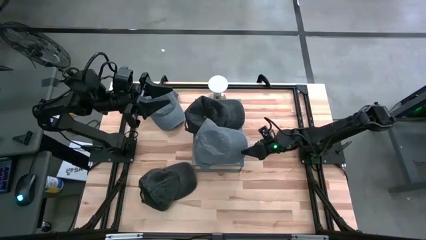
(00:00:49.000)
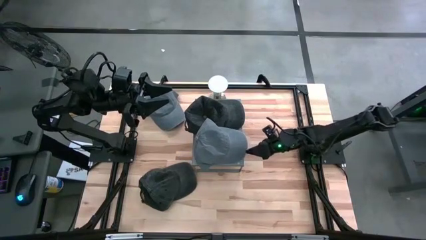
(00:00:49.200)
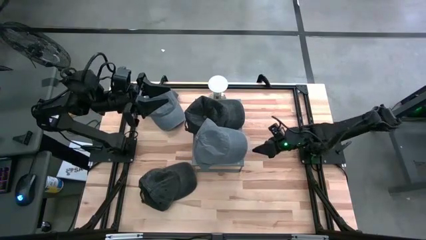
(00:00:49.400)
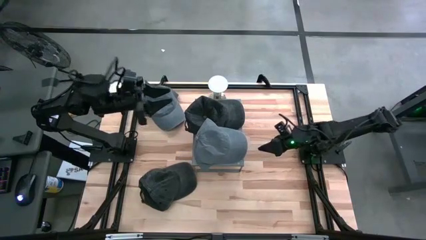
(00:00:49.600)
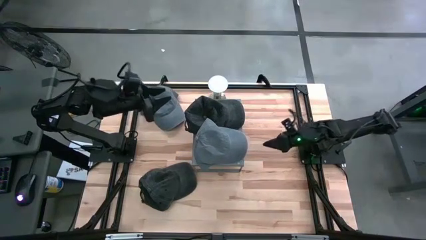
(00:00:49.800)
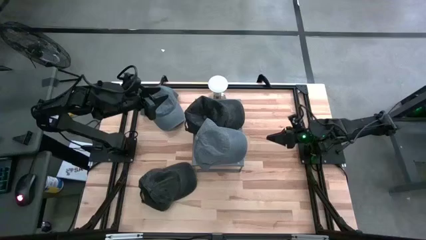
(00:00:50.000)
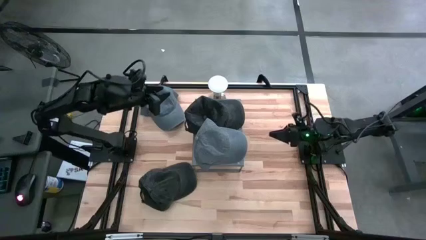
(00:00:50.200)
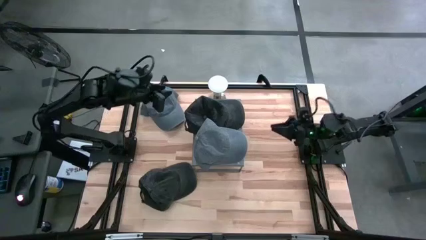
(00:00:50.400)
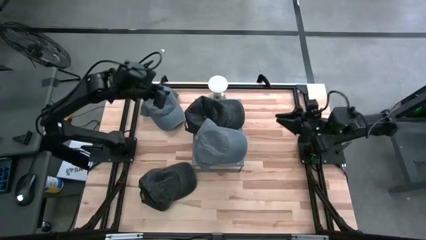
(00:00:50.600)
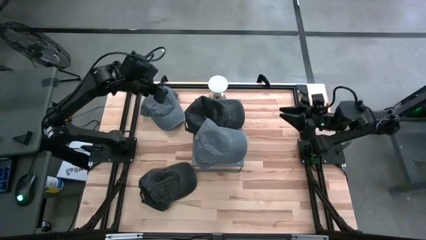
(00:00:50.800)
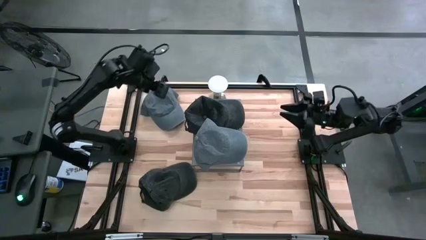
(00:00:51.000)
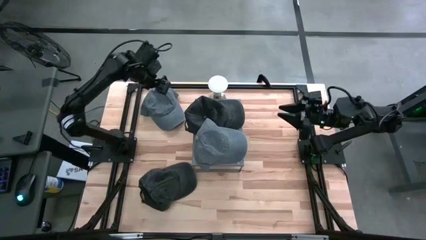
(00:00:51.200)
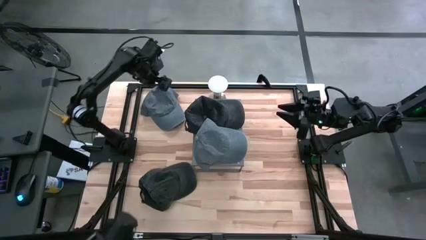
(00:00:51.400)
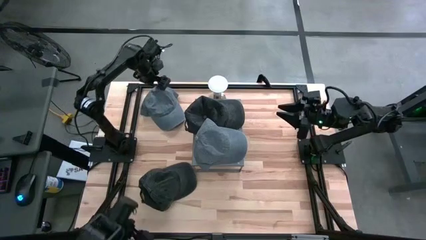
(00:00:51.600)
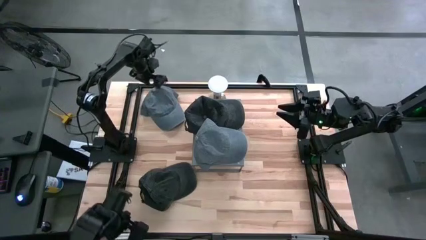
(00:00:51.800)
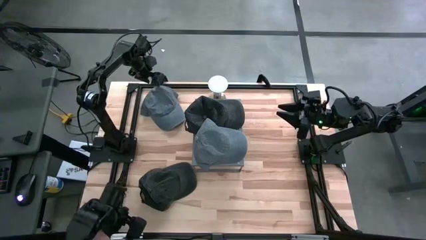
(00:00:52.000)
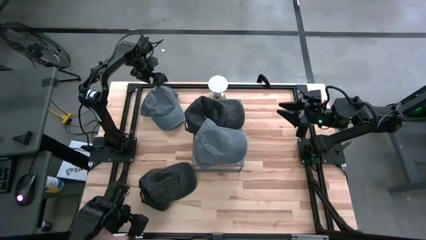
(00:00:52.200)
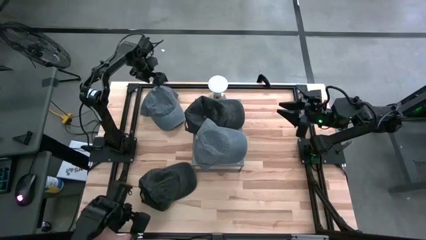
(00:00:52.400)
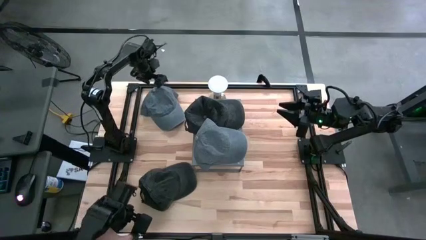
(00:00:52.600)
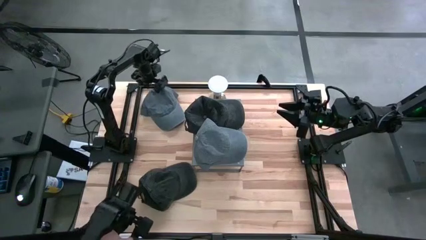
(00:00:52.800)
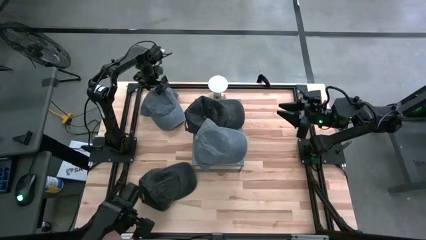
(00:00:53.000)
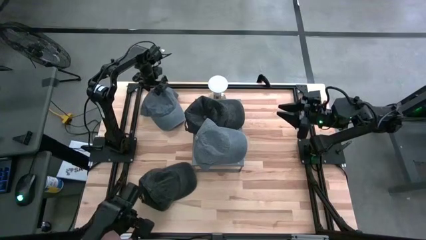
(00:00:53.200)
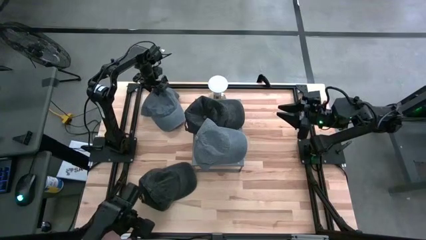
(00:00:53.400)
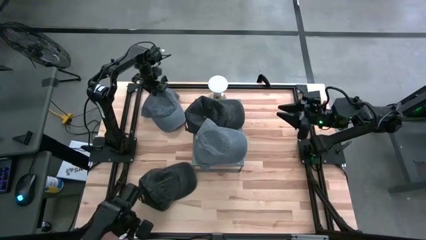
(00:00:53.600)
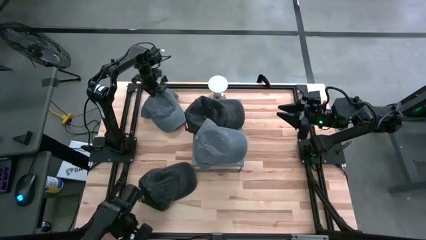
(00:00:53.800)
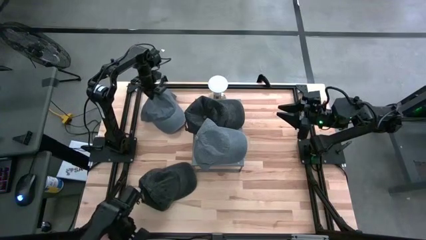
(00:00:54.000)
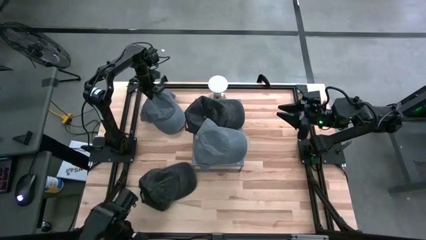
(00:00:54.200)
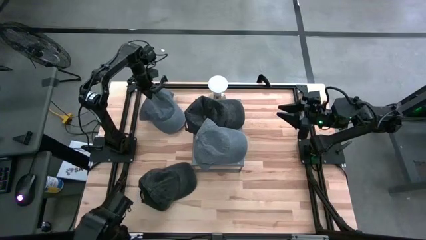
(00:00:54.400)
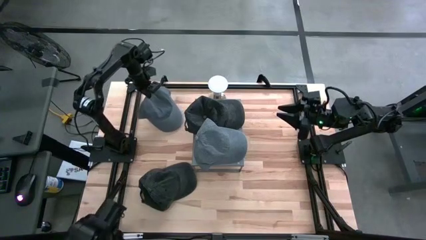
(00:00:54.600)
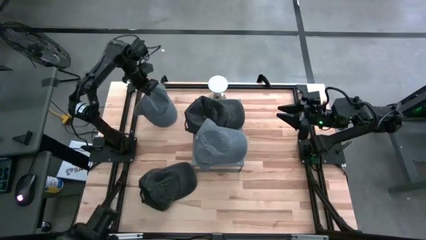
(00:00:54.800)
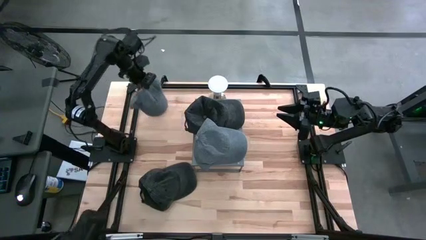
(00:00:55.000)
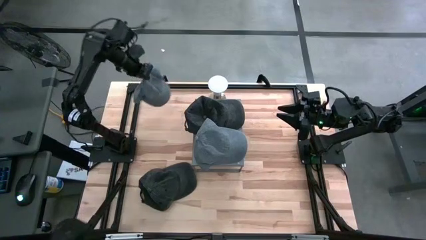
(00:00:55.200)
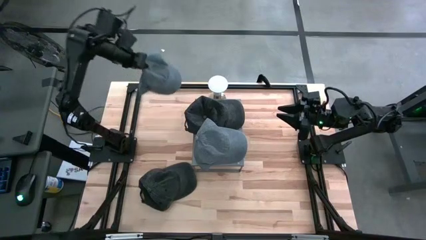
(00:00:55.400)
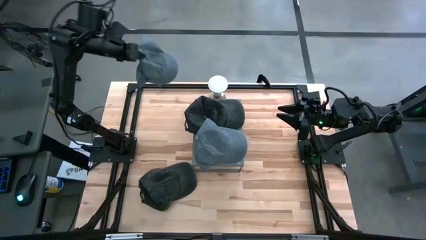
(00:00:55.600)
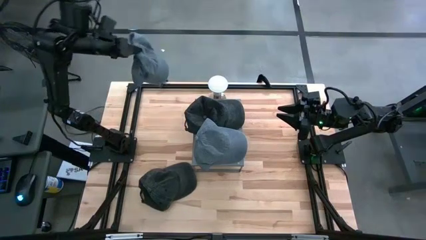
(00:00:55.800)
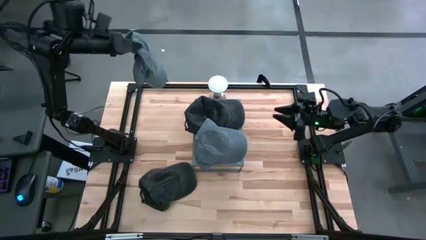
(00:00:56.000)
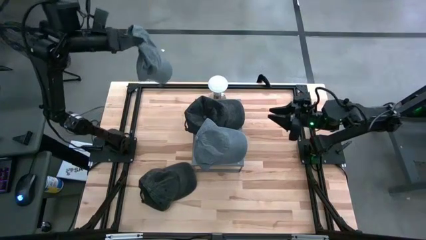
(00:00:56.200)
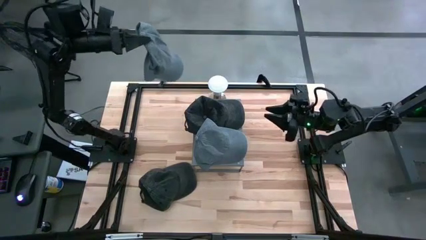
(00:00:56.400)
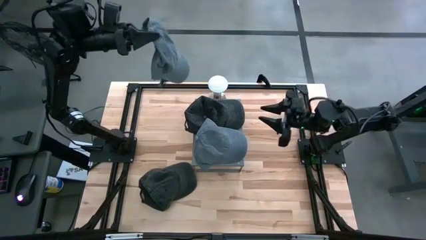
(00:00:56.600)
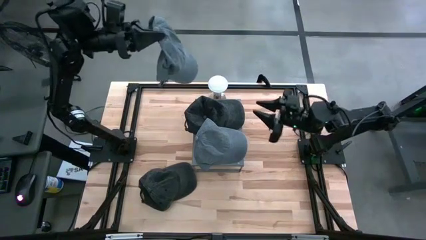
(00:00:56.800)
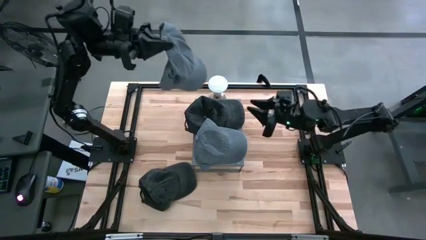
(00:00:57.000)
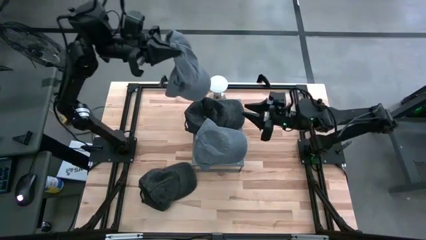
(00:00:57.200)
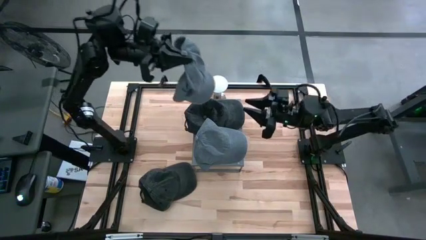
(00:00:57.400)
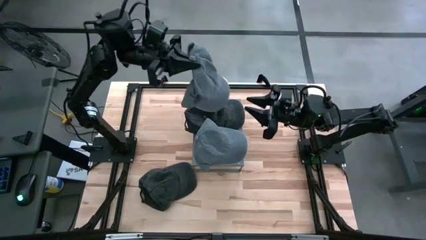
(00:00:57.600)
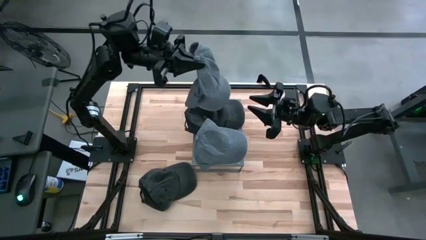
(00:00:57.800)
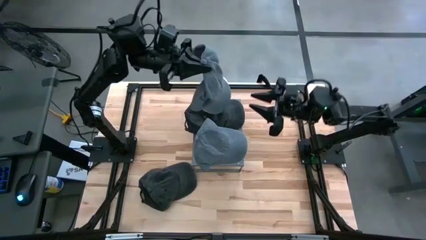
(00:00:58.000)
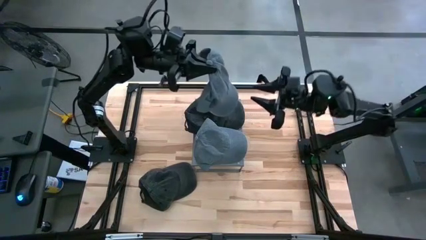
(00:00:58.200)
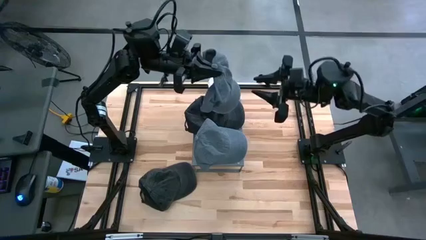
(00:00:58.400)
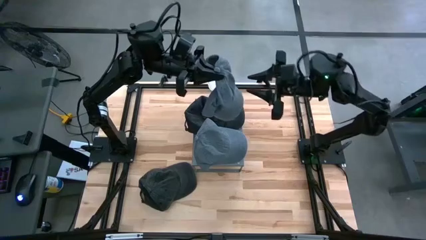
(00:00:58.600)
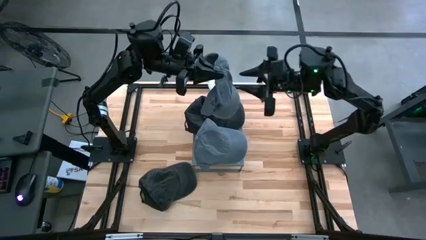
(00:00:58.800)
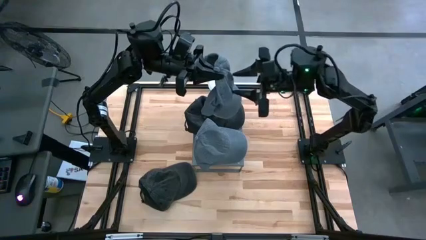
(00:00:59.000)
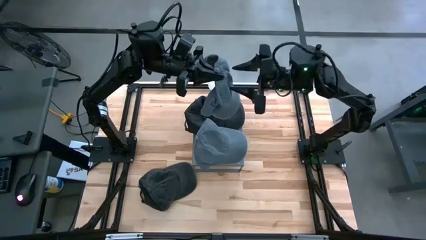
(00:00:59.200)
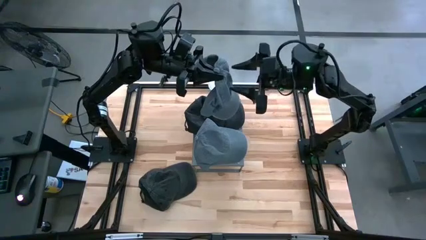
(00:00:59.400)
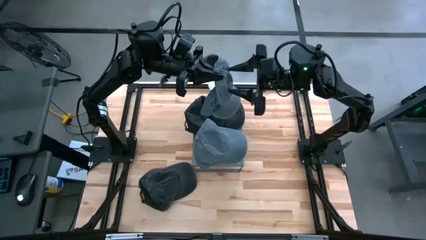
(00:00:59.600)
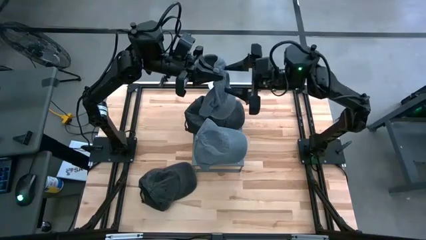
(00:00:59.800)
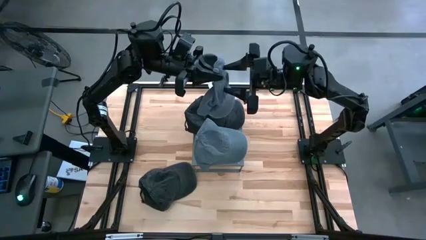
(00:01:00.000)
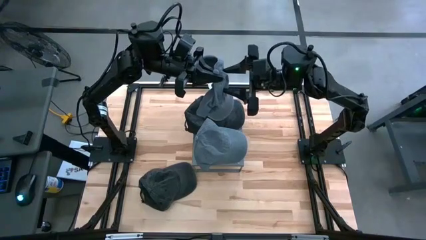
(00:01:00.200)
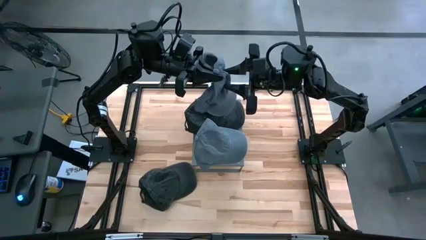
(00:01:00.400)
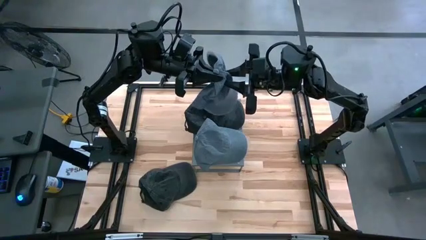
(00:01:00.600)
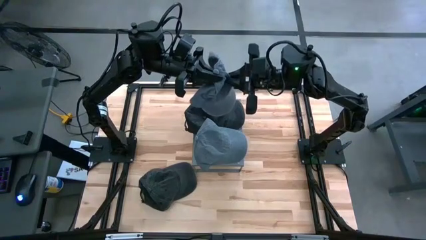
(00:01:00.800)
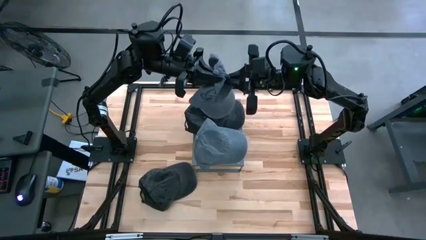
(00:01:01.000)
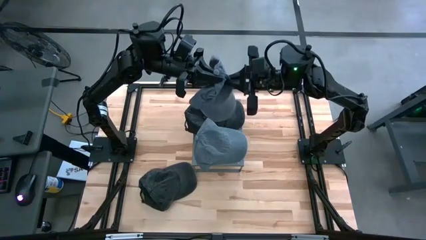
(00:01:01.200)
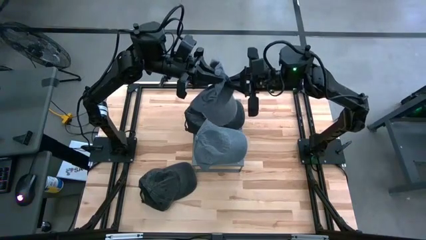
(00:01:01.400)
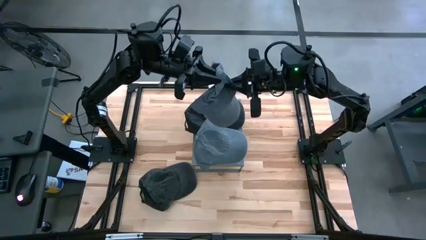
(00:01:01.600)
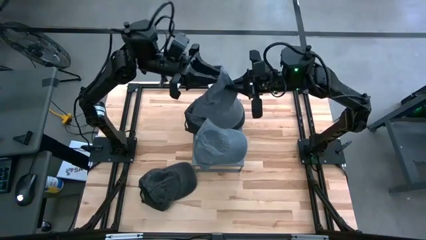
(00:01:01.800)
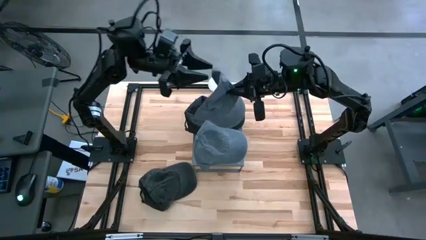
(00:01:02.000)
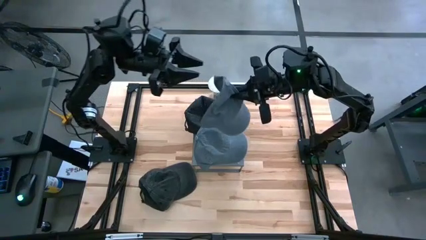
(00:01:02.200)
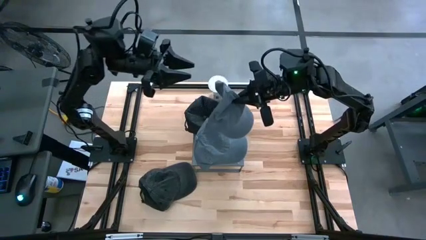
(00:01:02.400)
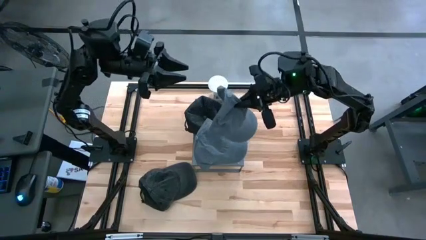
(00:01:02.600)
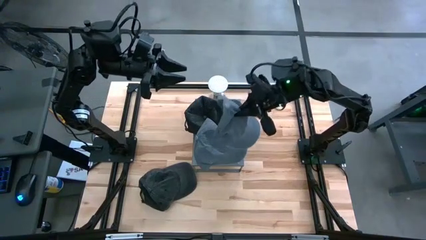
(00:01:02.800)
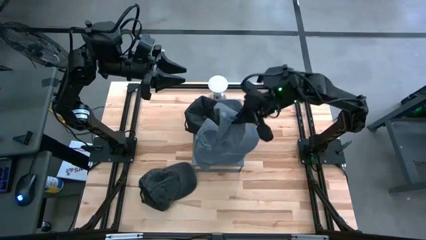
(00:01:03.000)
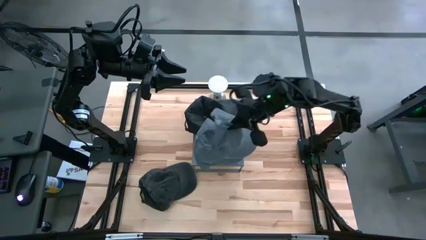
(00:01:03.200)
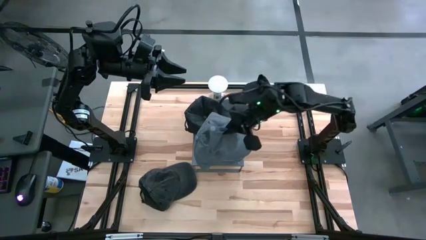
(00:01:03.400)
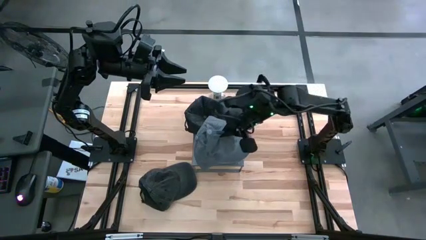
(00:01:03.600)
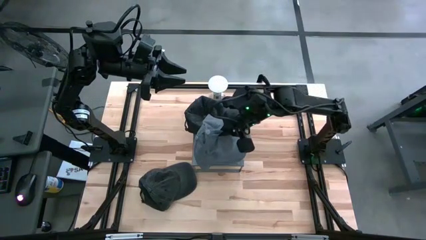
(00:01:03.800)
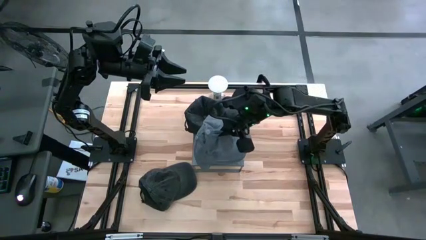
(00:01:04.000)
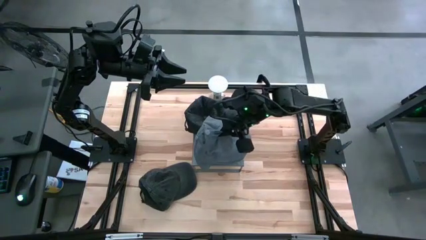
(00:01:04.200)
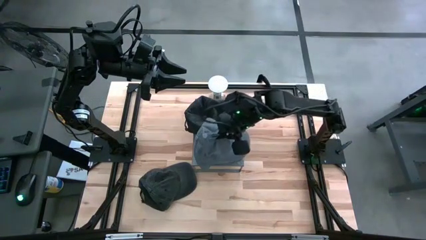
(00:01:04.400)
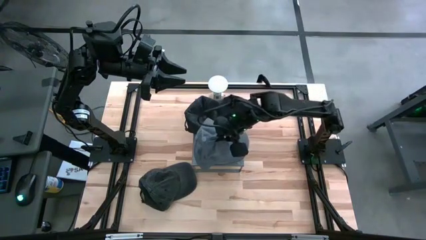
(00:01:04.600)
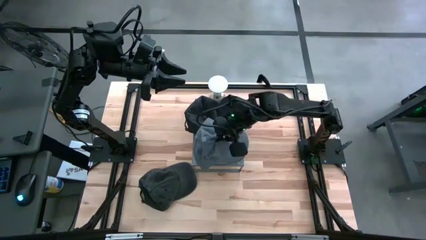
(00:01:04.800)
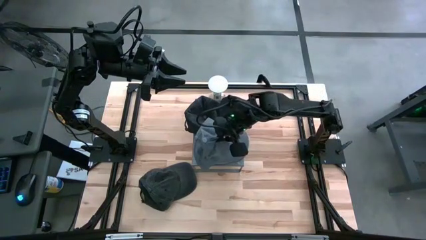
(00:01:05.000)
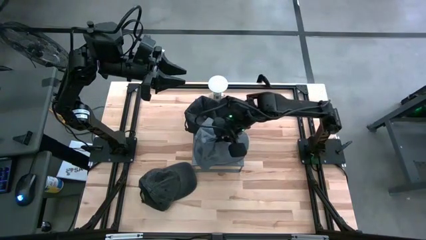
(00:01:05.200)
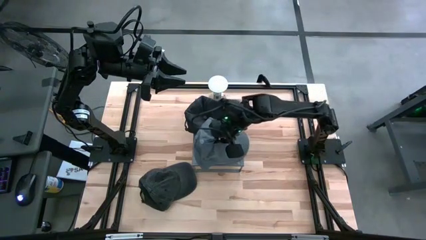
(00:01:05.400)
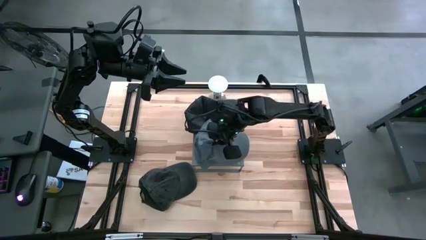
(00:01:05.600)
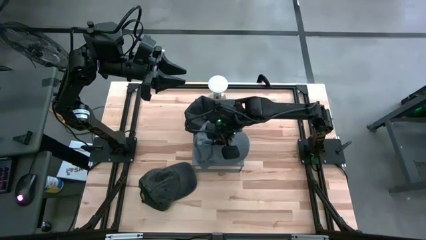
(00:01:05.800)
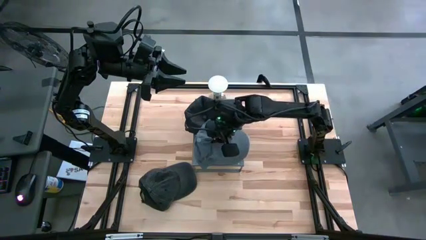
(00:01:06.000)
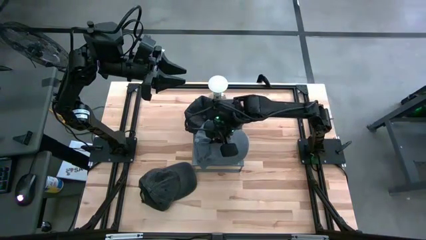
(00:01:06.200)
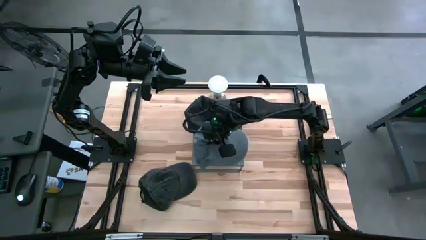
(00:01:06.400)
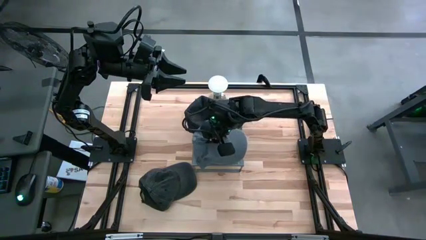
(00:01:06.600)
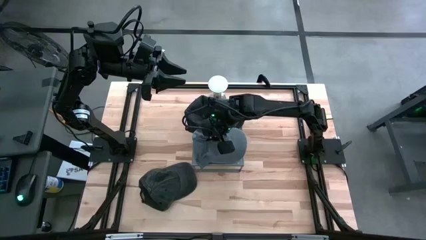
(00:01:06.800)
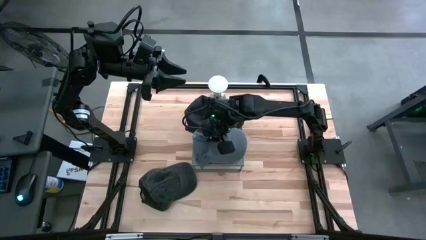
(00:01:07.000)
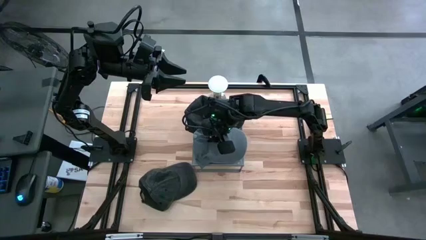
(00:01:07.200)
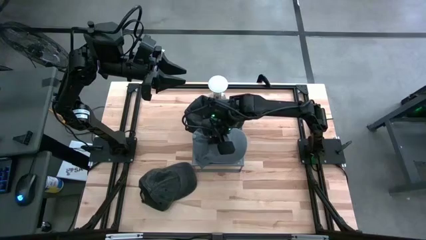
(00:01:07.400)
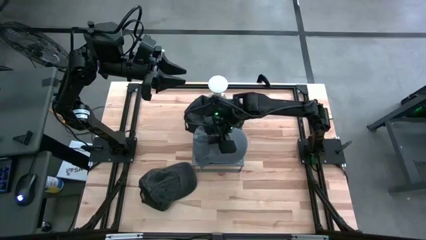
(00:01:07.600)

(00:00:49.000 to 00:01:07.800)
Task: Pick & Place hat
Stack the gray cap on the gray cap on the shelf
